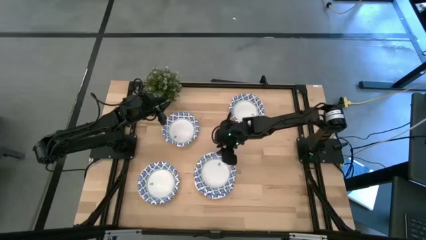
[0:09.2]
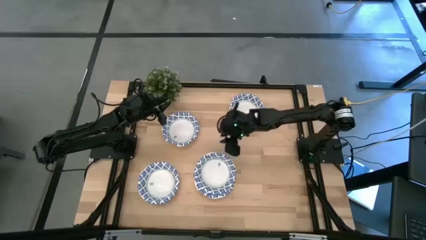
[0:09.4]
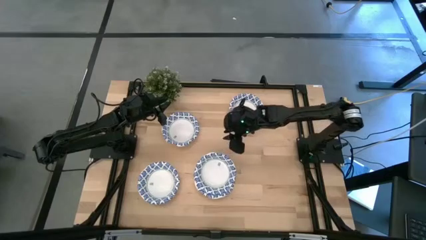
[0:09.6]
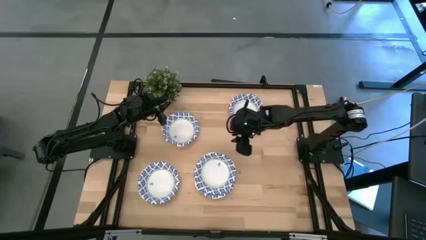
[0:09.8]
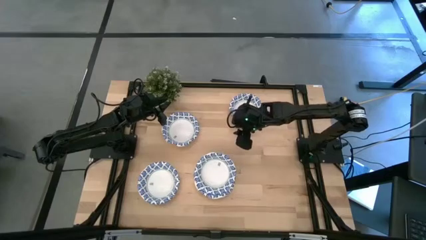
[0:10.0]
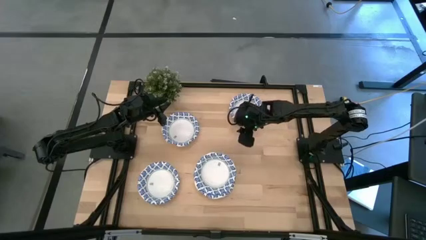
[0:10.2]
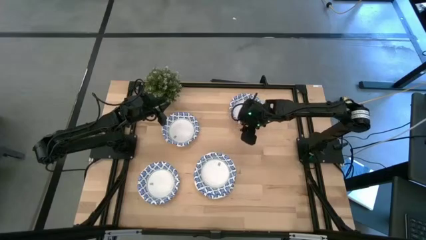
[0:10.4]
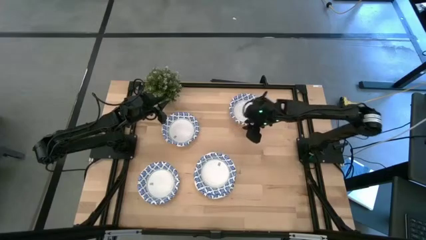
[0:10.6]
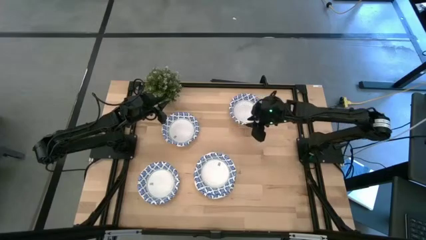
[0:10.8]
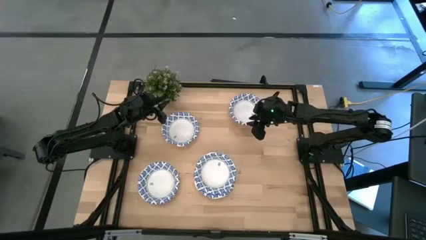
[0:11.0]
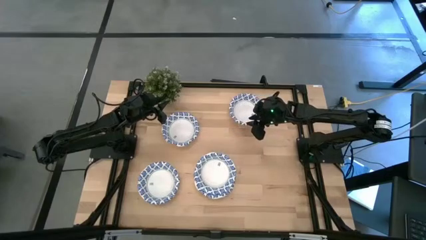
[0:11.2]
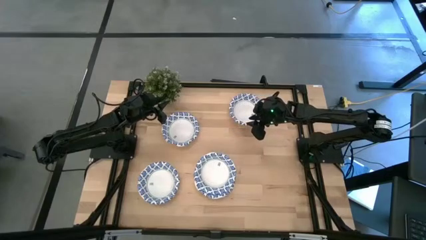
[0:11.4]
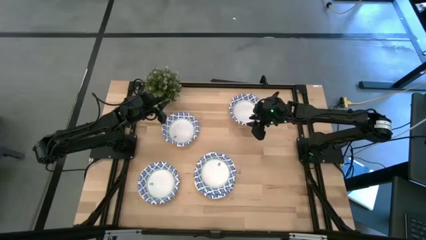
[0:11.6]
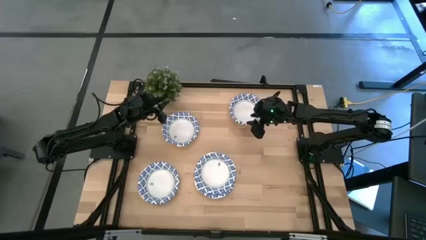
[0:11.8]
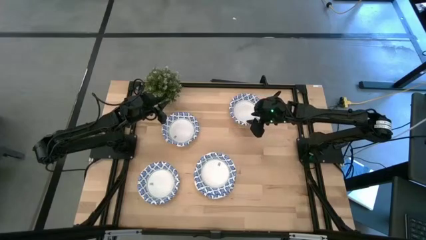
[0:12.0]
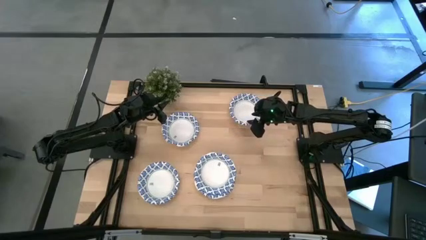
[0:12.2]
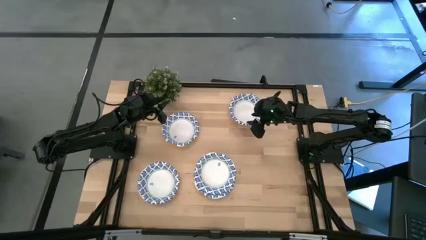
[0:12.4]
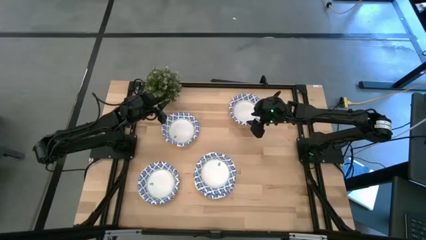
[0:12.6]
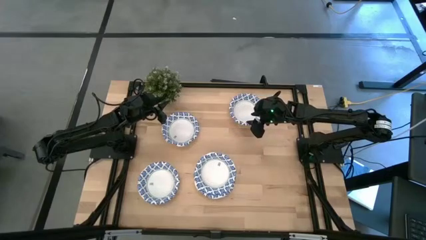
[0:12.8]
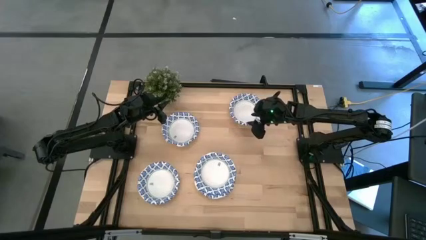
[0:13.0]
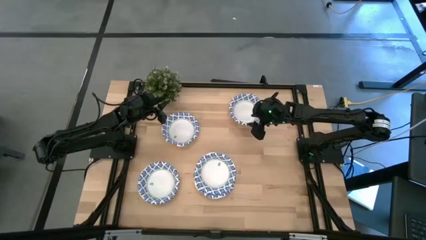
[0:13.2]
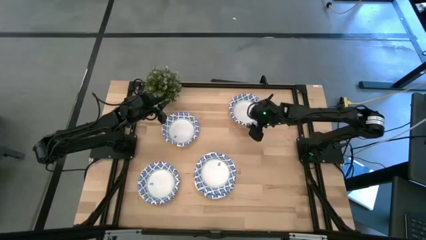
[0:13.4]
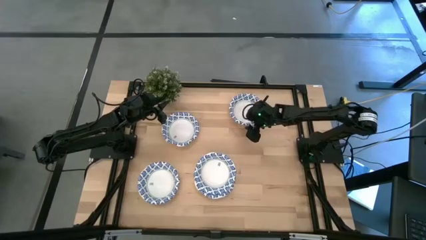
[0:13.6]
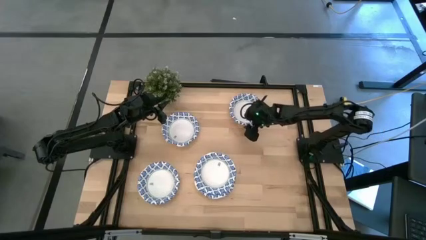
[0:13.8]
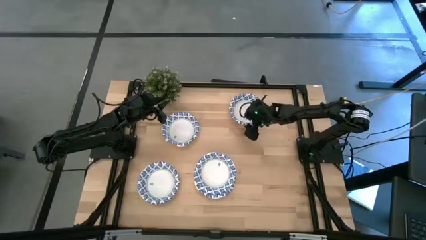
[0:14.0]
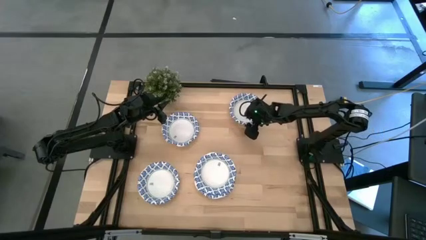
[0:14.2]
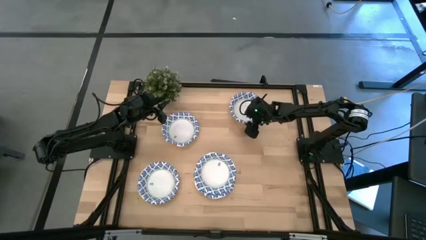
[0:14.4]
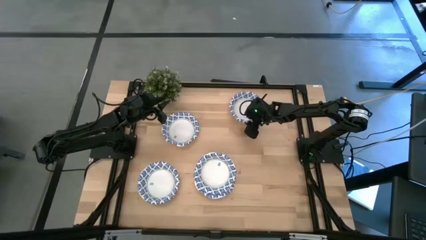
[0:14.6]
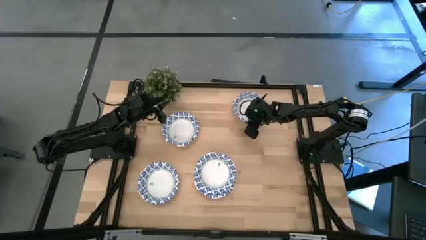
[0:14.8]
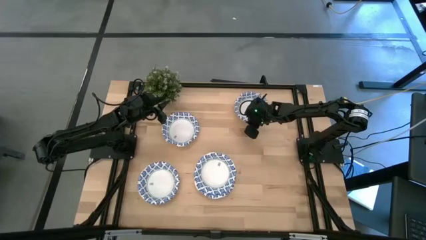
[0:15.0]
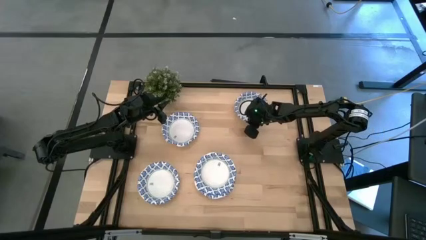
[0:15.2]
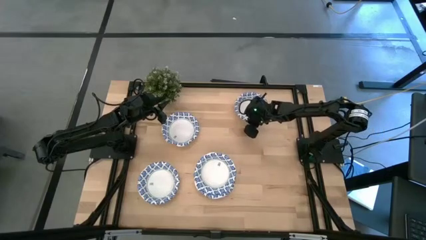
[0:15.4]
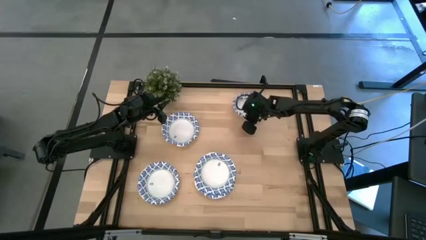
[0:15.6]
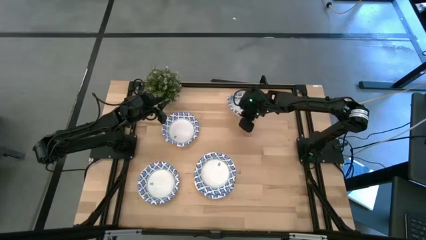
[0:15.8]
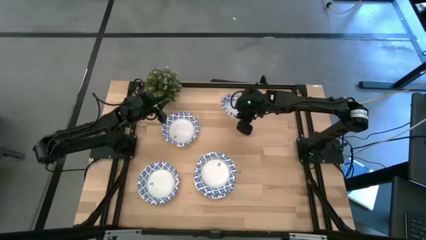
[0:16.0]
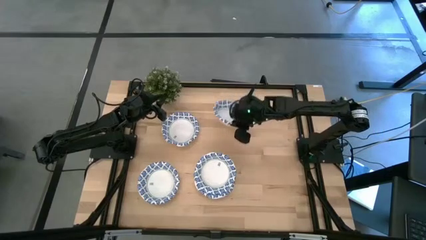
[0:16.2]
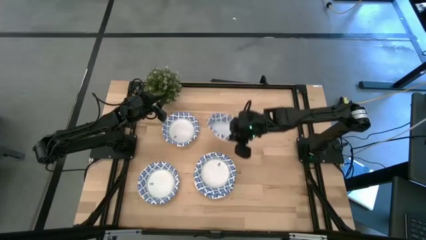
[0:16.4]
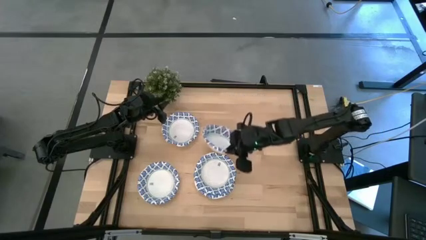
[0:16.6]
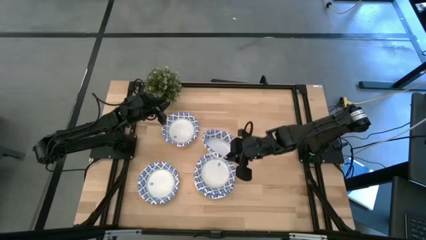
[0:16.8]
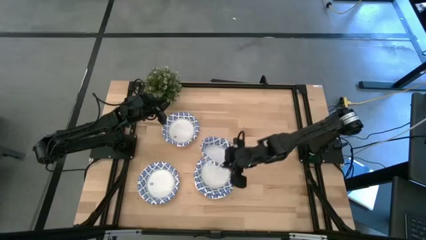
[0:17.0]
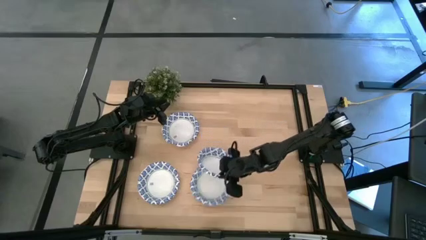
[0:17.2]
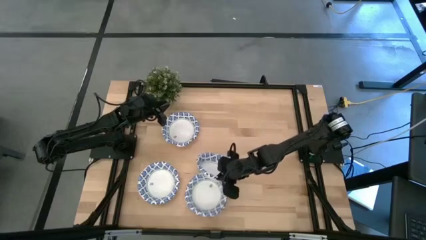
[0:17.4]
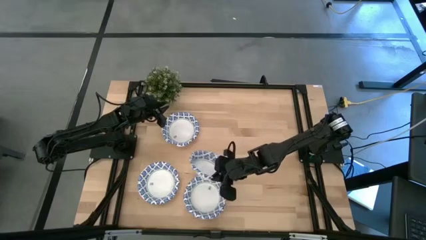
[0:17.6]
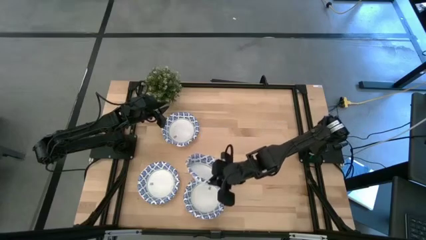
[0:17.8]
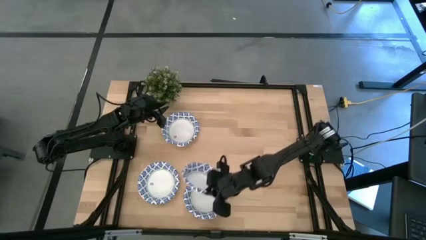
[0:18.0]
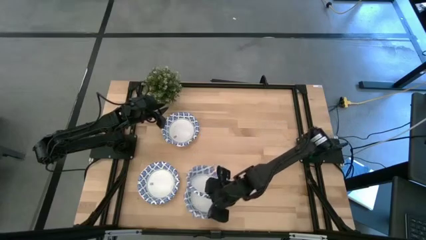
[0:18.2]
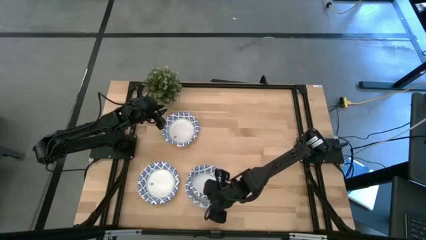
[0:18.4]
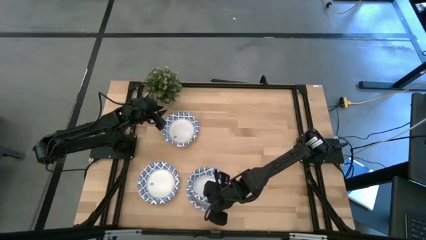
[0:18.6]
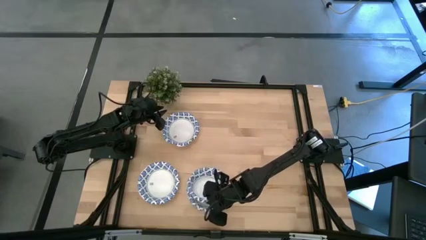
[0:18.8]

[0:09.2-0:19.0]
Task: Nest bowls inside each other
Stack the white bowl on top of the other white bowl

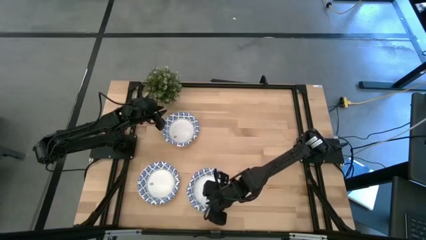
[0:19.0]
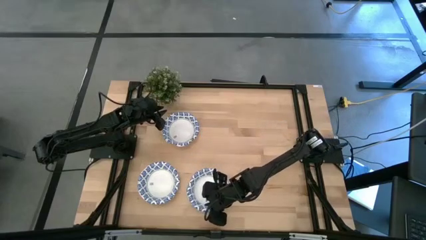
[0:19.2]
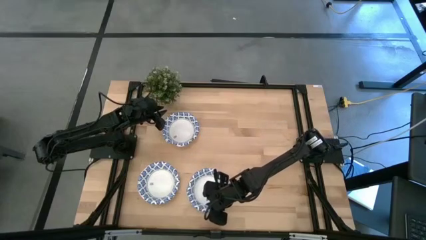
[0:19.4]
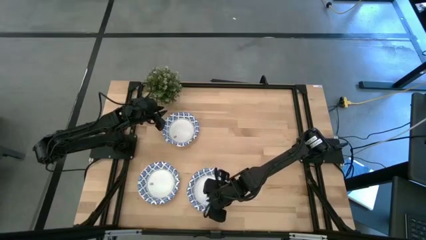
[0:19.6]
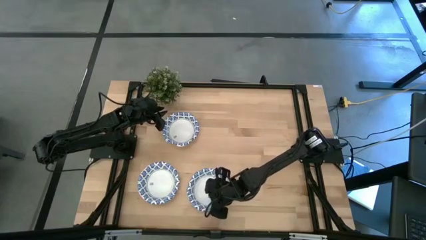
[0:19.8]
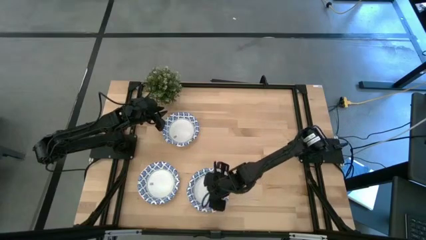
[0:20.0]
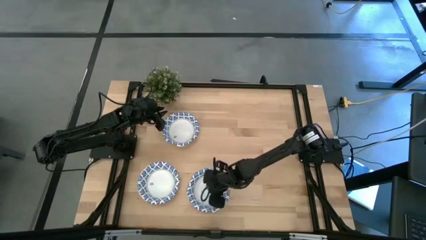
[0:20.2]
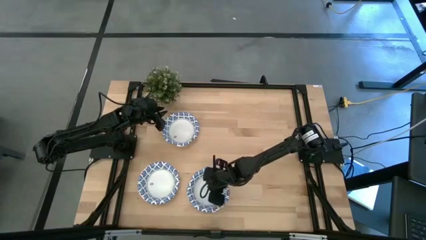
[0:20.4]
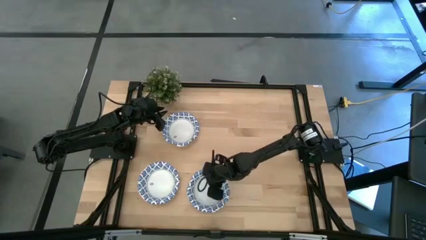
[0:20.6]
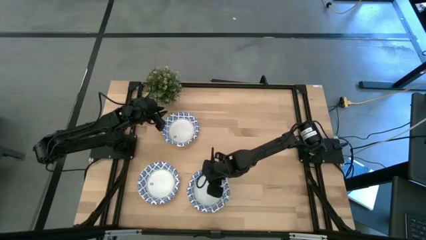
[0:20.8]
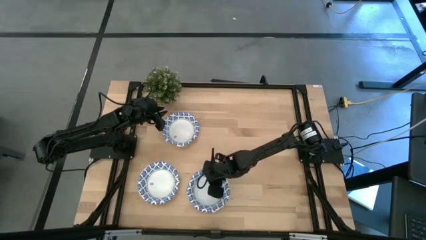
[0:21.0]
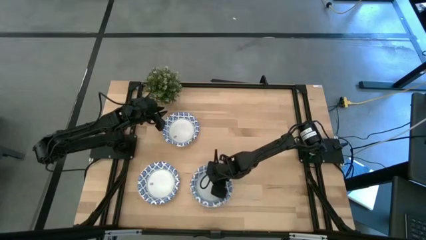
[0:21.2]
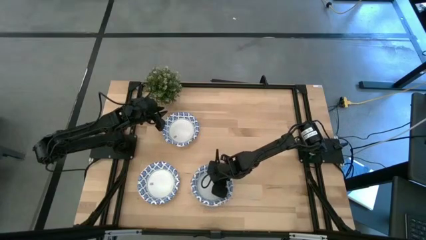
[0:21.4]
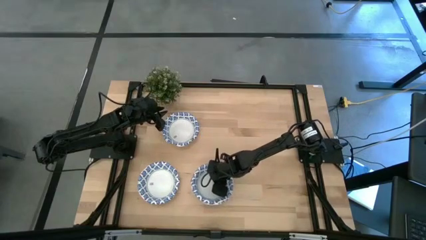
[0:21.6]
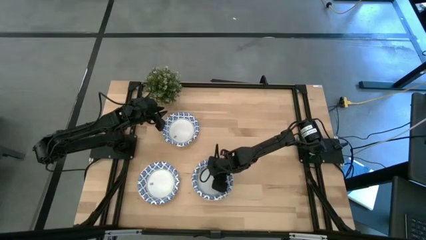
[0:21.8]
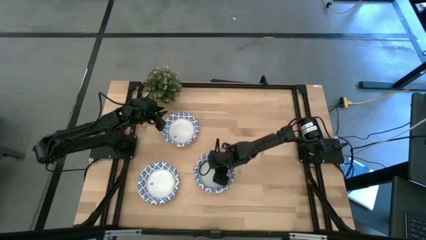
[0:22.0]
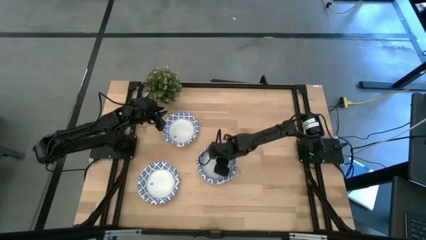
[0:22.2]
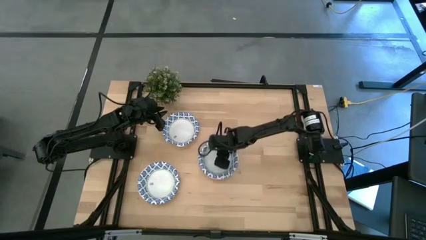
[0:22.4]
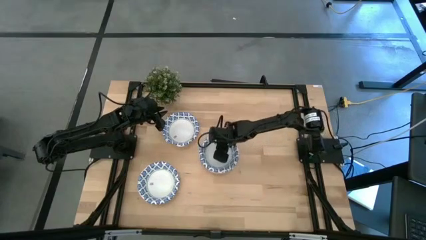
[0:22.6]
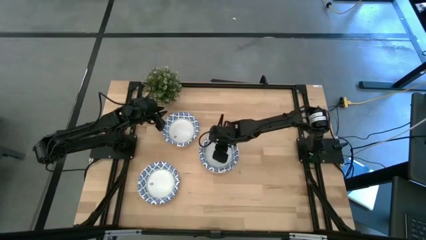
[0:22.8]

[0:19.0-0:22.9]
Move the stacked white bowls to the center of the table

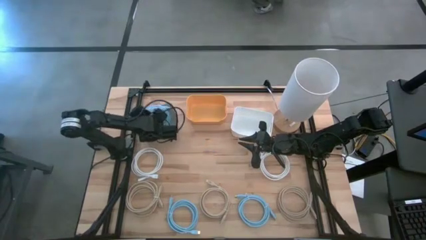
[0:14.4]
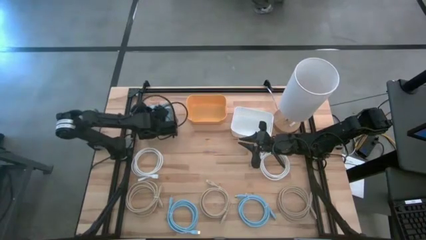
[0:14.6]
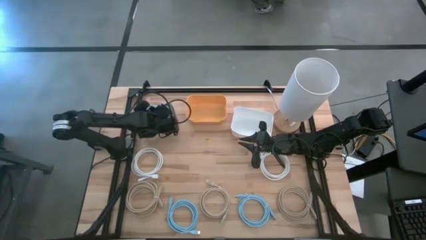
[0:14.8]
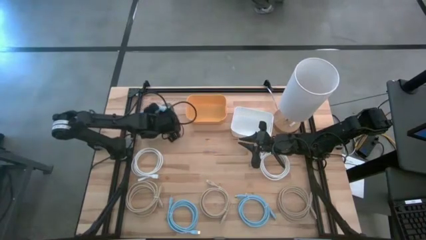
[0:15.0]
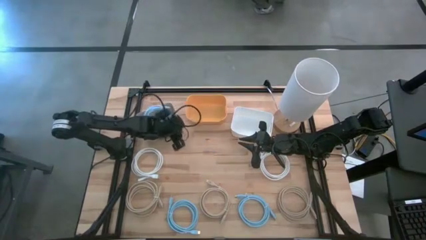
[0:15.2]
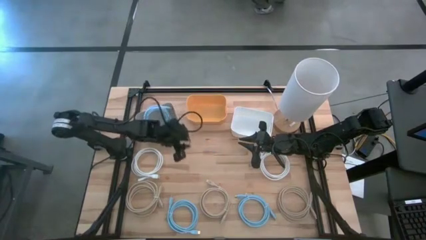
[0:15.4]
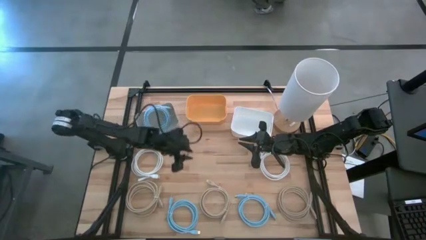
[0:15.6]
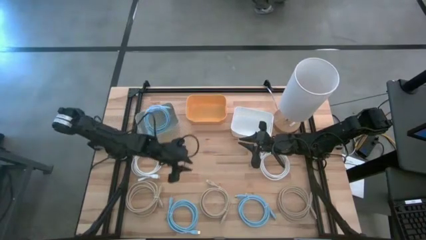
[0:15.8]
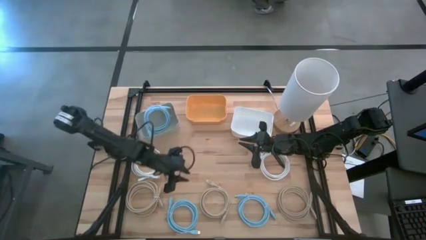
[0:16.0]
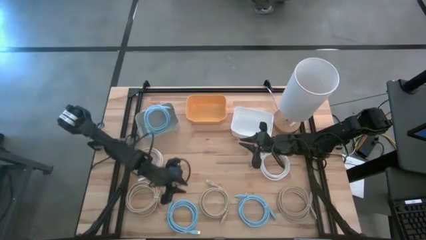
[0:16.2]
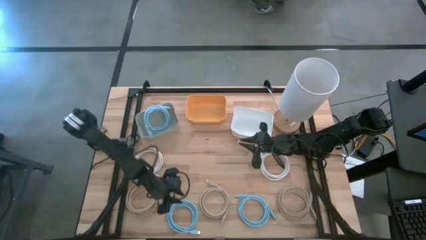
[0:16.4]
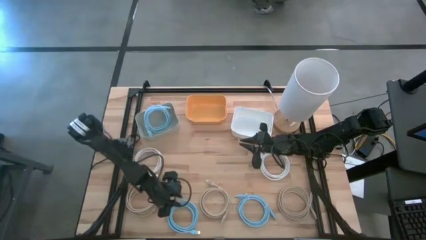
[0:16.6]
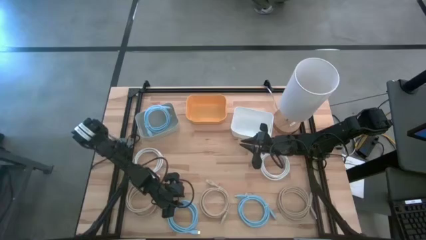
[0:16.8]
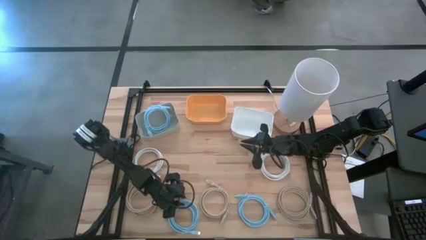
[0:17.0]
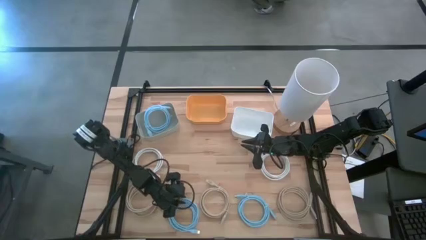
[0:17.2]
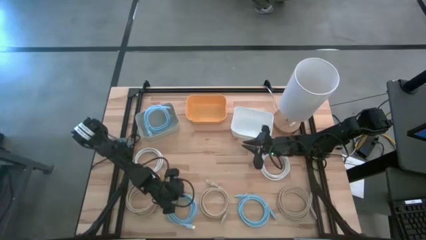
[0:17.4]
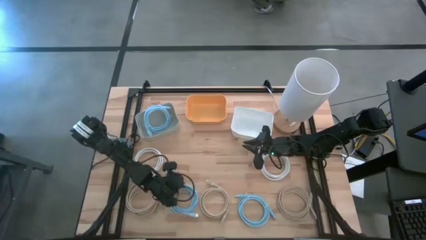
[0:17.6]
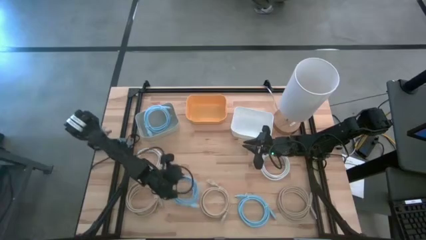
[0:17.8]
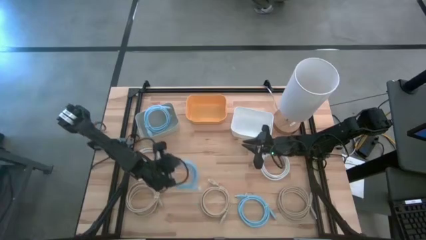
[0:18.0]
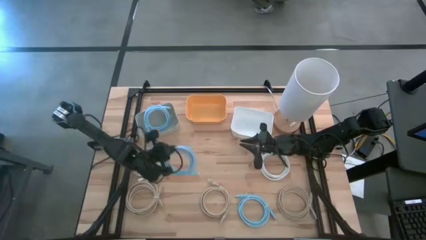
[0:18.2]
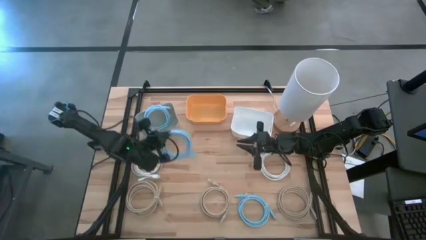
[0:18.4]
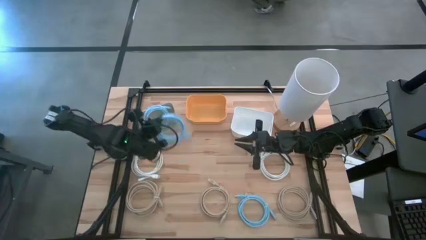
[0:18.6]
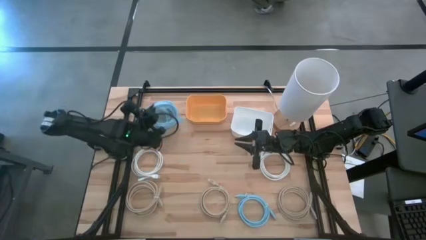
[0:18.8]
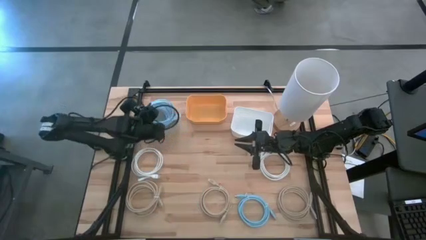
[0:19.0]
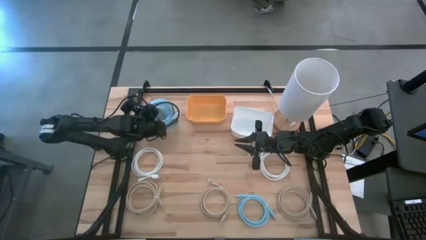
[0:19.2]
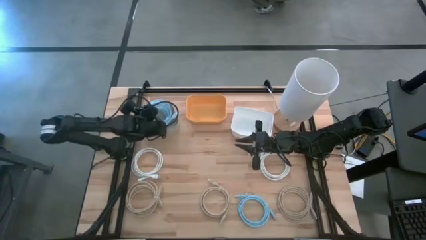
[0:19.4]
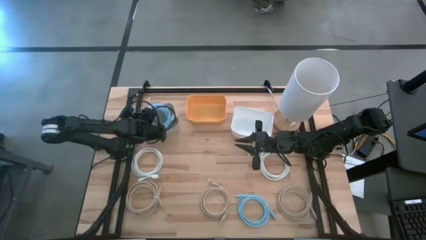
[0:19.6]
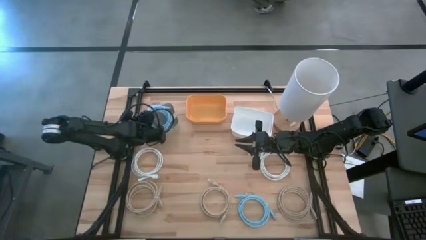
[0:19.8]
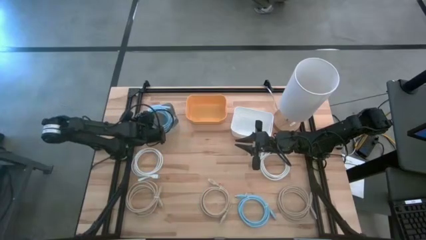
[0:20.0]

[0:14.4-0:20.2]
Task: Sort HDMI cables
Put the left blue hdmi cable into the gray bin
